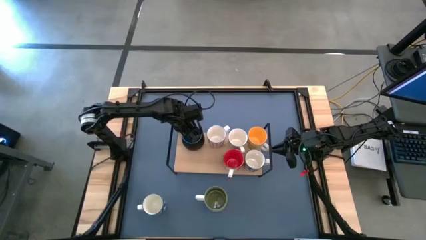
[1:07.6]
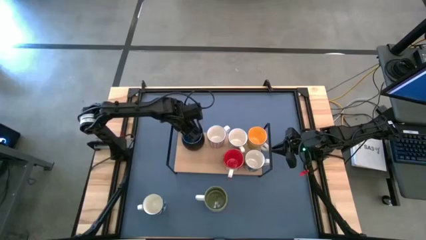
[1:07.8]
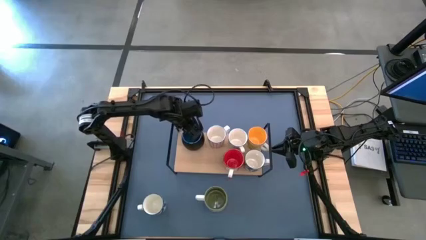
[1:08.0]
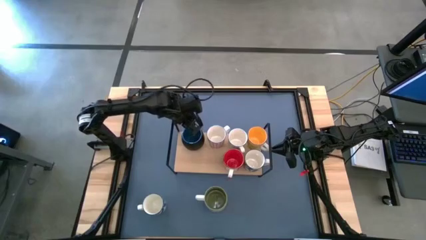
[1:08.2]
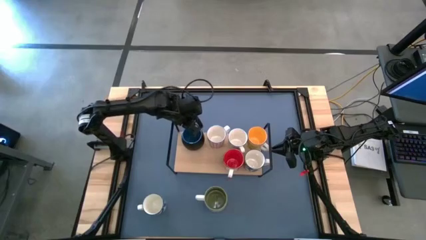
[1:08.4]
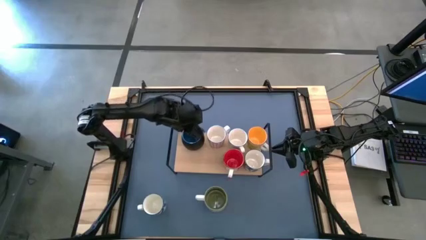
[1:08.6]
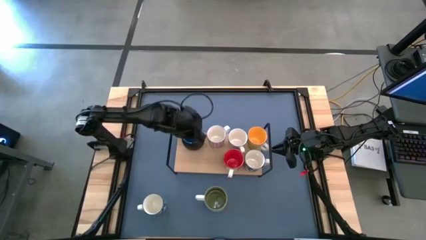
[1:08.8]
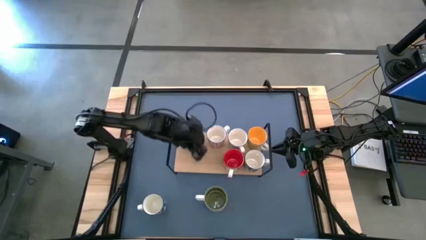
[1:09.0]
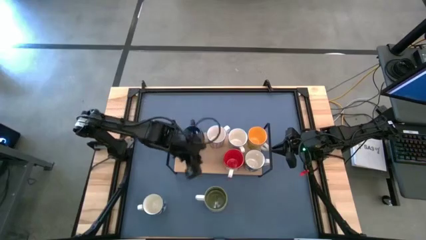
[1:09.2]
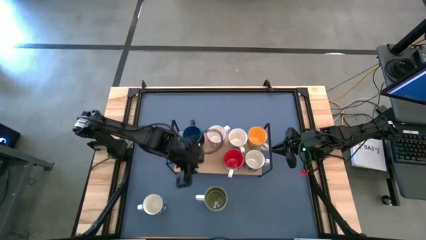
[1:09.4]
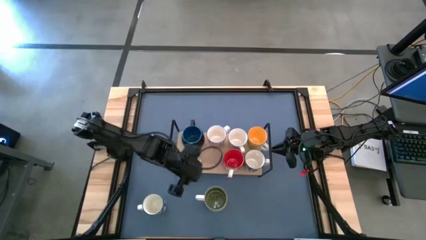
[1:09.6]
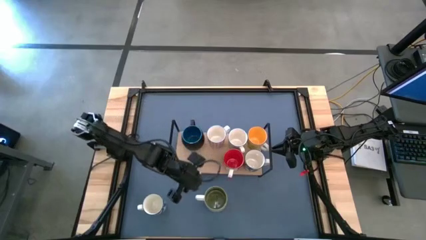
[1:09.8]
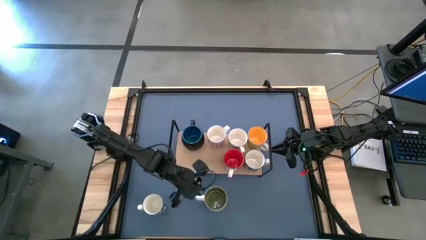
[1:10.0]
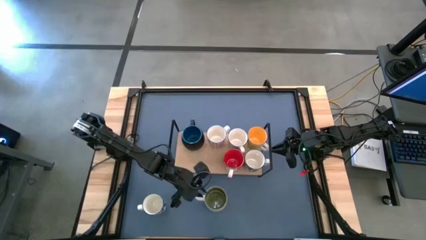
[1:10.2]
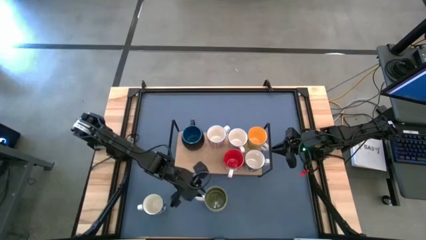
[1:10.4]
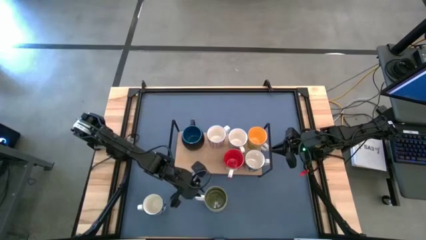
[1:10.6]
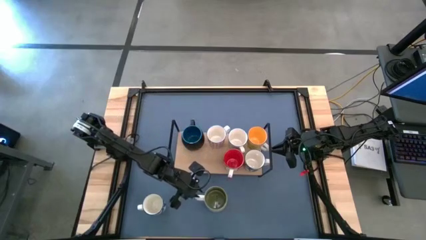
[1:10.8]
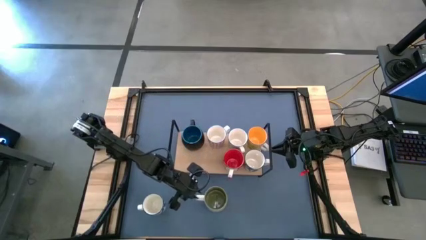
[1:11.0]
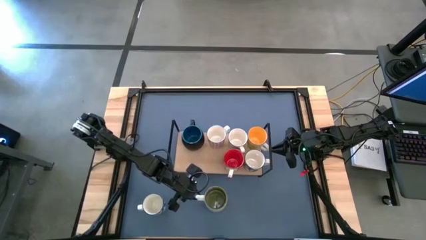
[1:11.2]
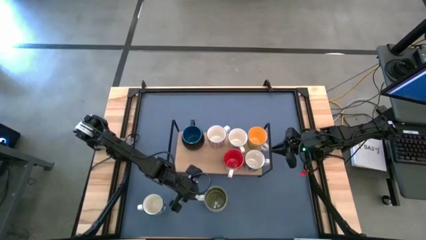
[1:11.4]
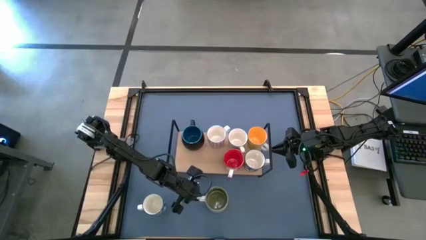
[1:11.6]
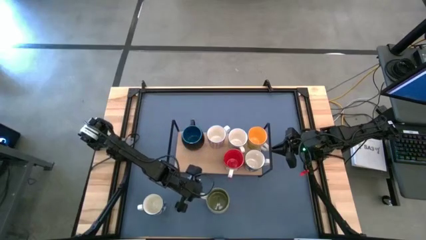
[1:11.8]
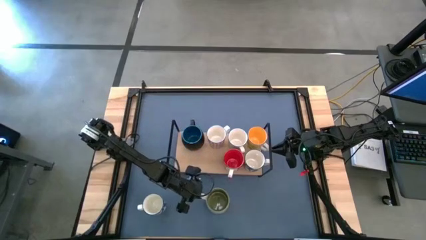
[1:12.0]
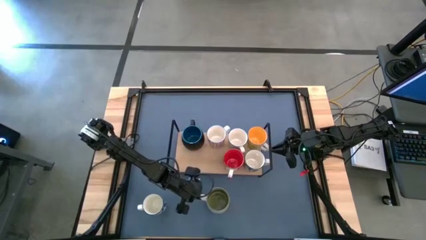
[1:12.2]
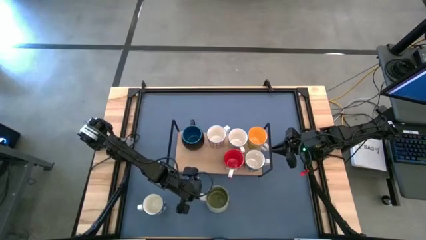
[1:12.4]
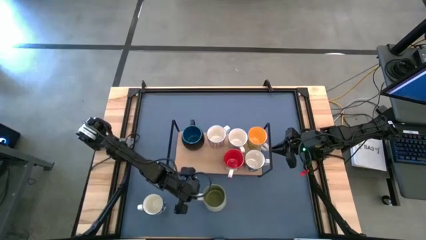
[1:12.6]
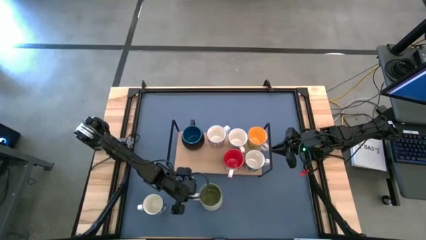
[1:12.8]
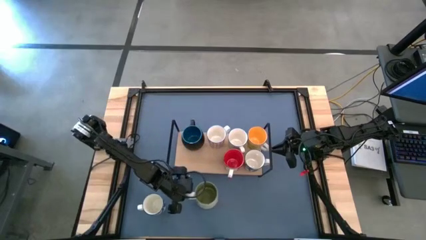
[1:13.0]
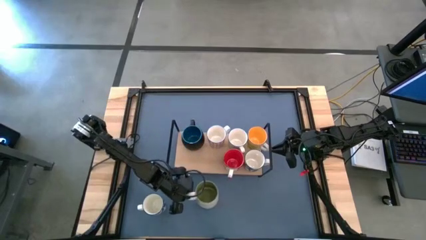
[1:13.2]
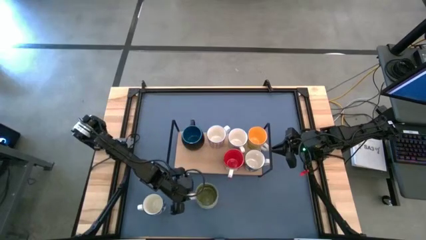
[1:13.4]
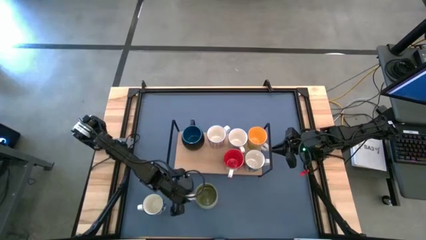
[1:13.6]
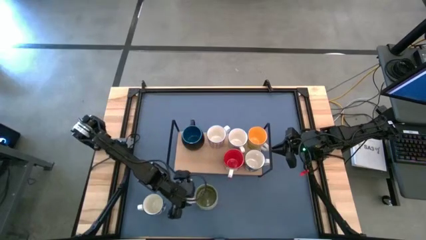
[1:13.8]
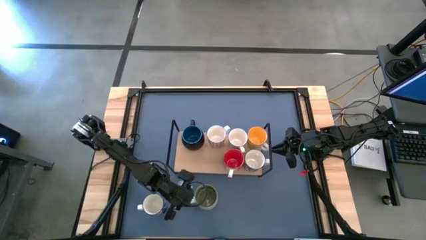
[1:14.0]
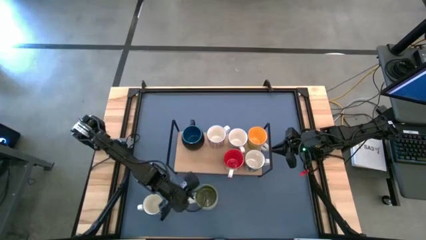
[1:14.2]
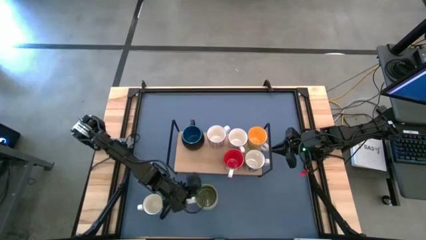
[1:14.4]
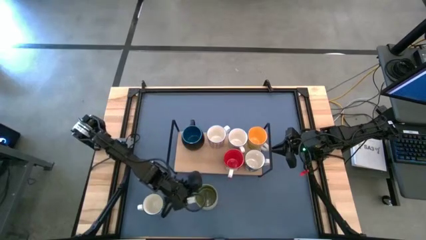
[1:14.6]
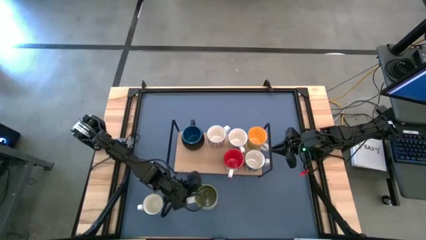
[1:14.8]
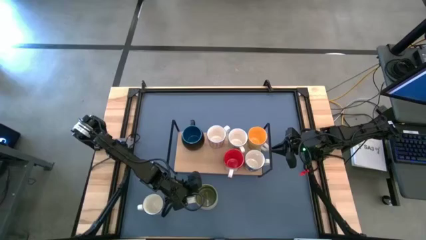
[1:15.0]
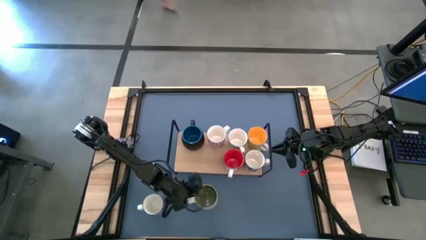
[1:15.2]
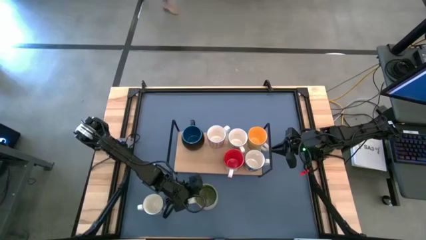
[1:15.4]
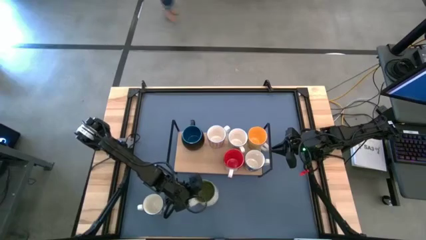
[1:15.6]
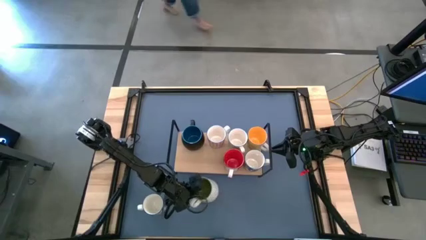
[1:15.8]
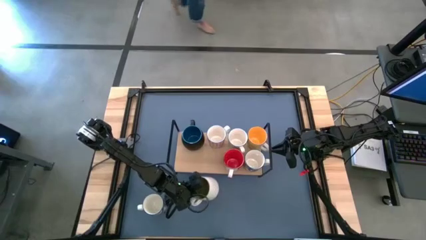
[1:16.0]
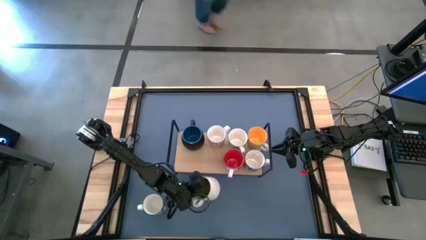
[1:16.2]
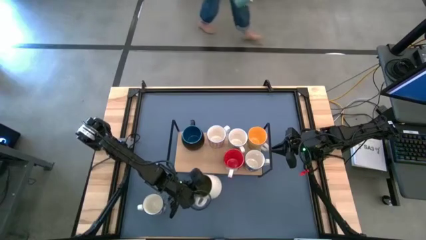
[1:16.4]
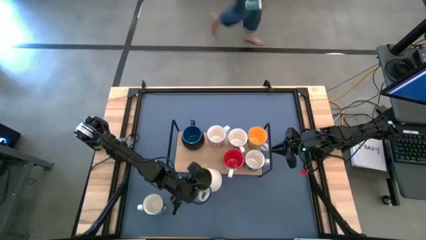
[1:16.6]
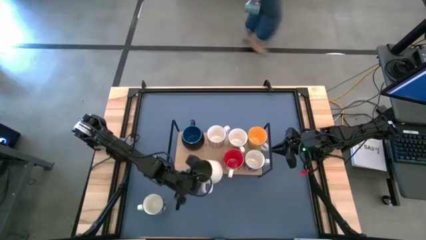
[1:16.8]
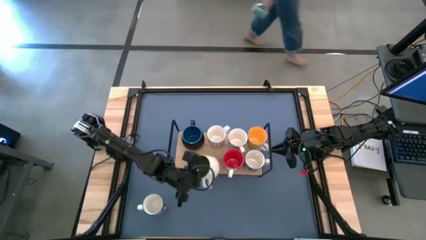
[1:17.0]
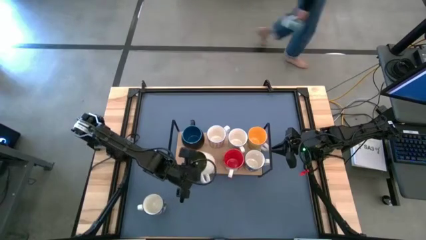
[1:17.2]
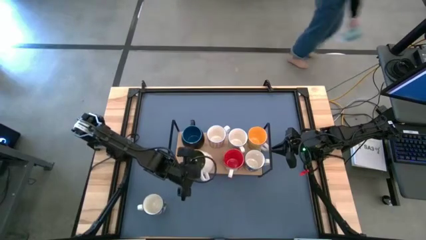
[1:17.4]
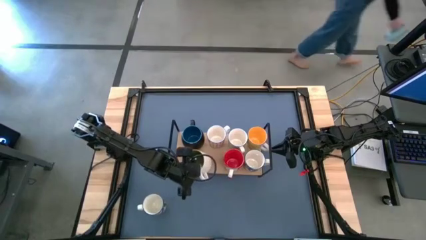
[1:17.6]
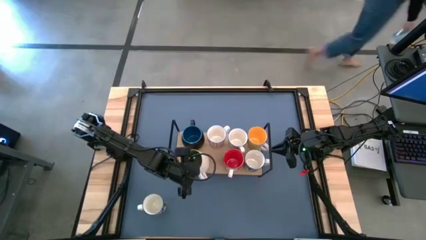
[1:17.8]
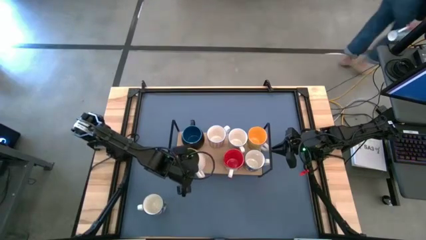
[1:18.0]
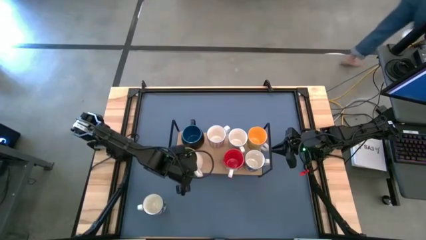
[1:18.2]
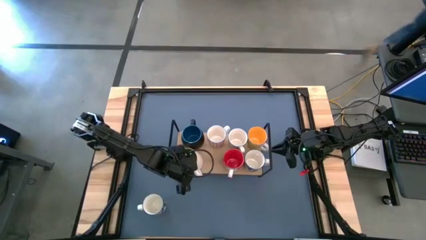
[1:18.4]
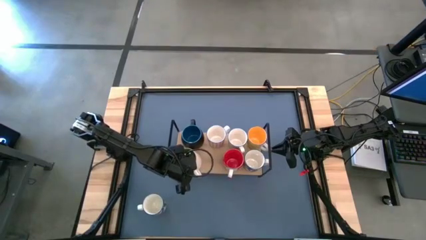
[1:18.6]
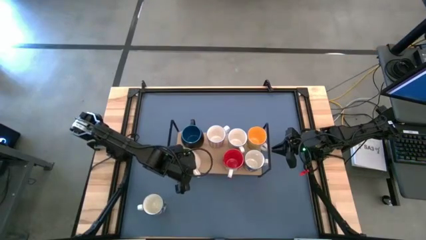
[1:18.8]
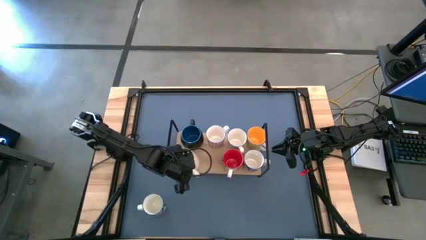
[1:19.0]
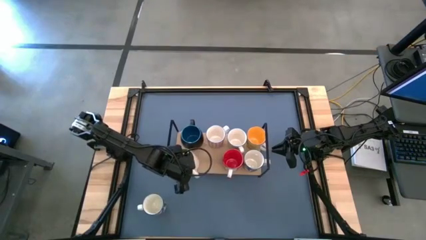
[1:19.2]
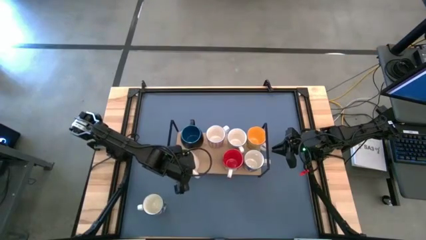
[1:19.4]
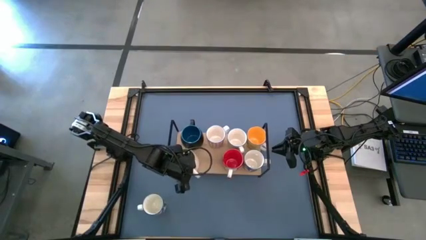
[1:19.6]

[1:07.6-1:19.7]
Task: Place coffee mugs
Put the white mug on the shelf

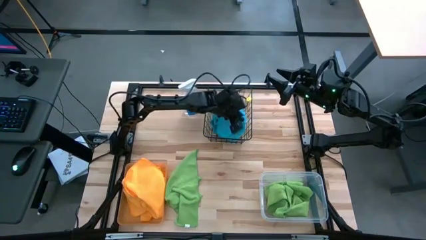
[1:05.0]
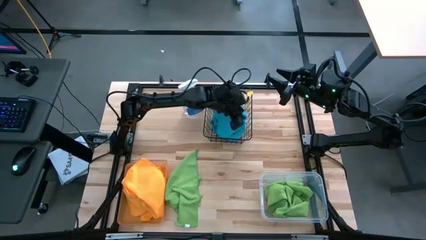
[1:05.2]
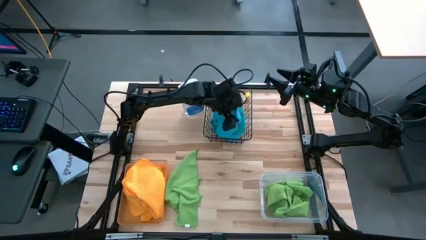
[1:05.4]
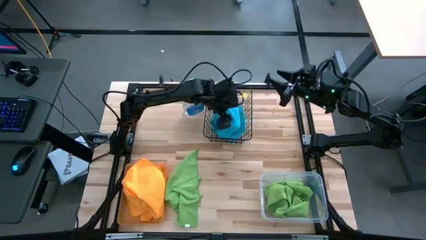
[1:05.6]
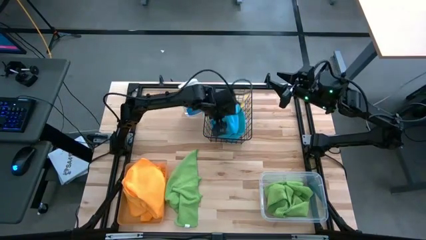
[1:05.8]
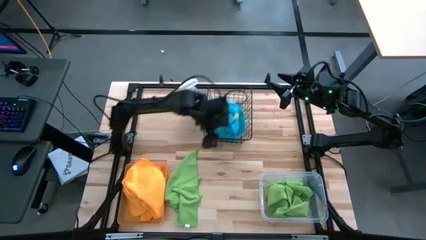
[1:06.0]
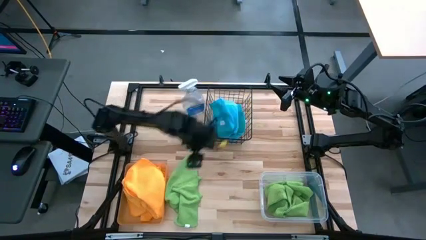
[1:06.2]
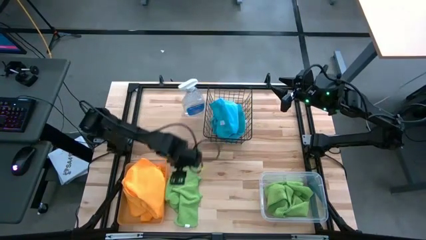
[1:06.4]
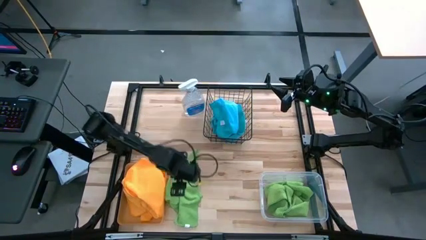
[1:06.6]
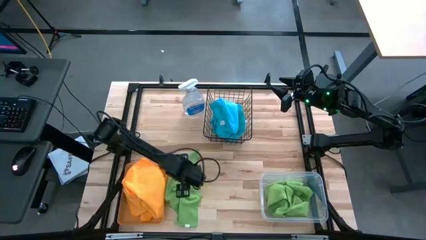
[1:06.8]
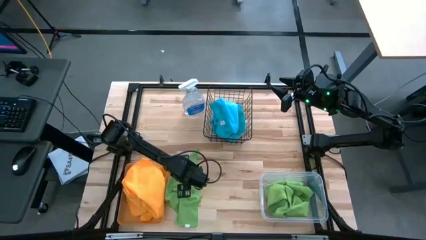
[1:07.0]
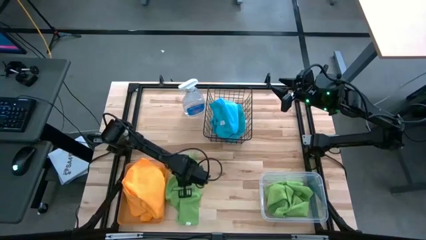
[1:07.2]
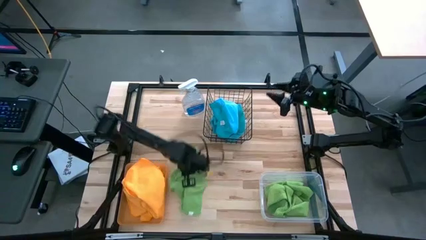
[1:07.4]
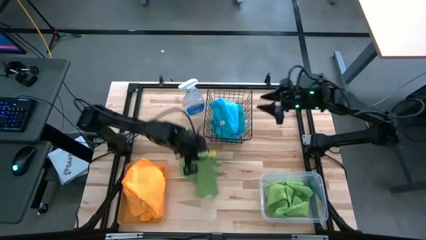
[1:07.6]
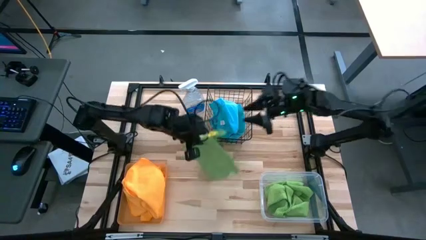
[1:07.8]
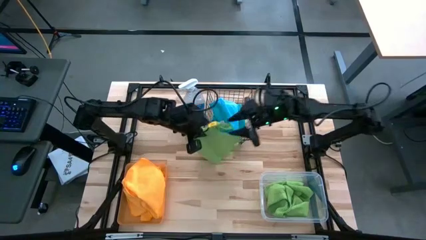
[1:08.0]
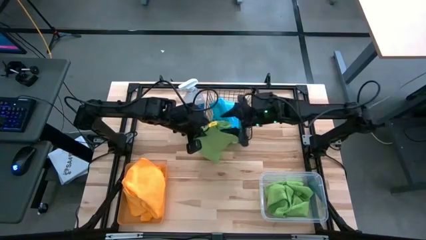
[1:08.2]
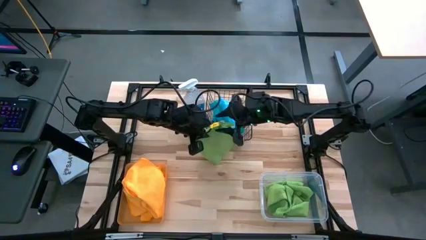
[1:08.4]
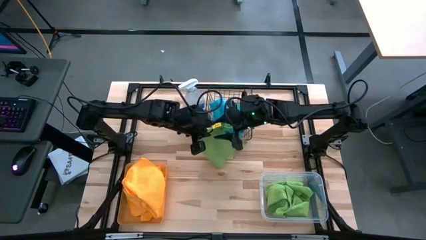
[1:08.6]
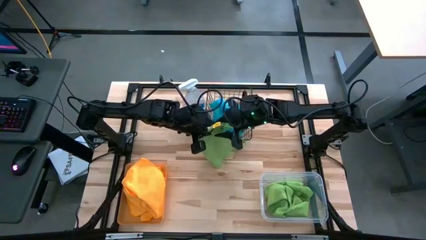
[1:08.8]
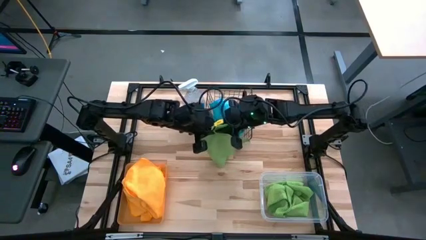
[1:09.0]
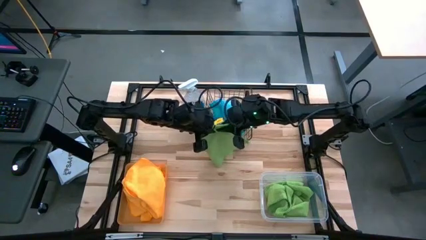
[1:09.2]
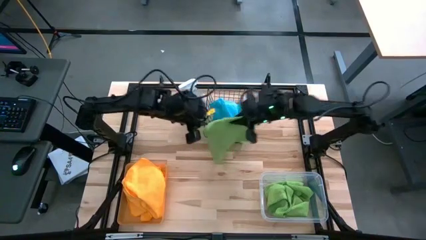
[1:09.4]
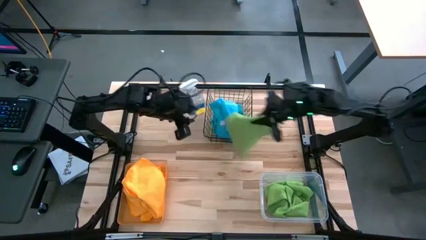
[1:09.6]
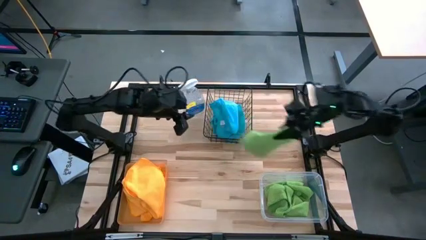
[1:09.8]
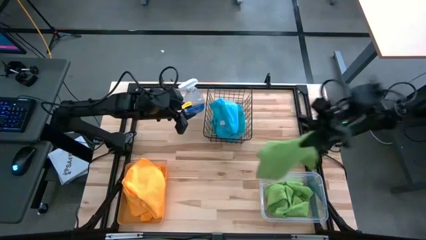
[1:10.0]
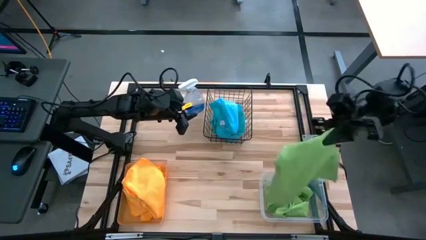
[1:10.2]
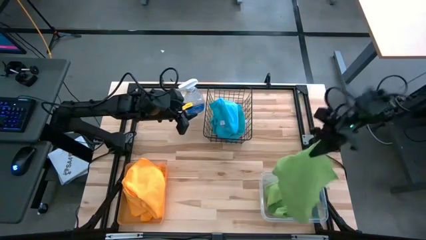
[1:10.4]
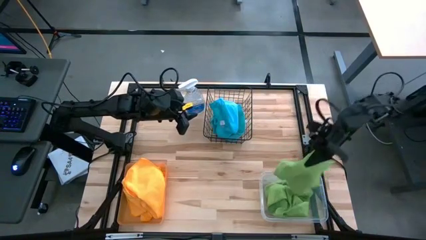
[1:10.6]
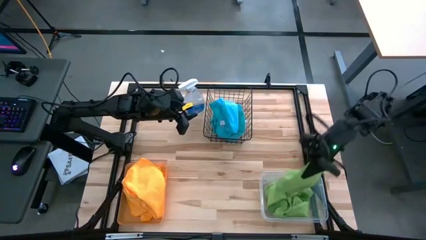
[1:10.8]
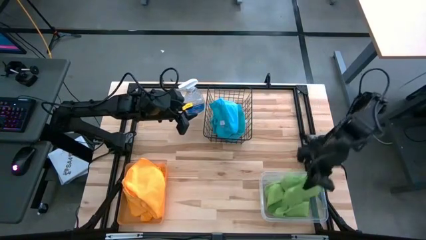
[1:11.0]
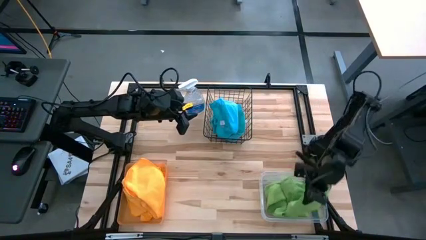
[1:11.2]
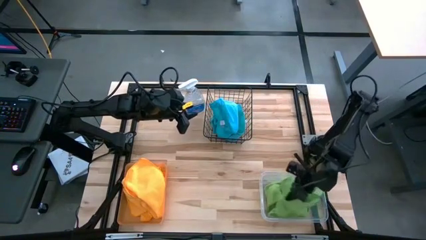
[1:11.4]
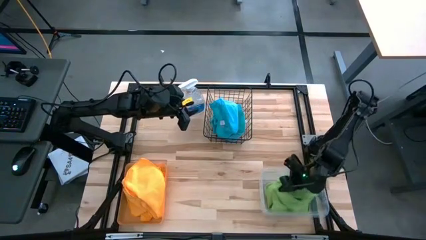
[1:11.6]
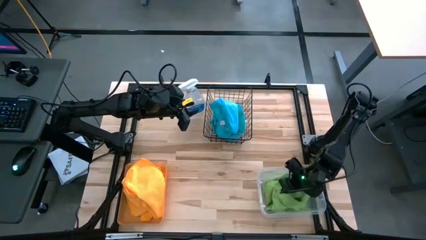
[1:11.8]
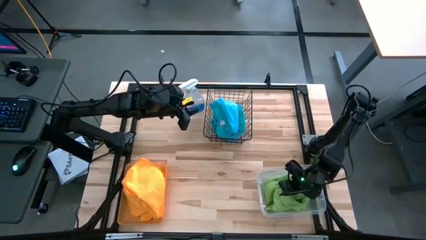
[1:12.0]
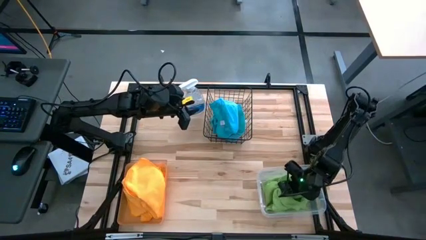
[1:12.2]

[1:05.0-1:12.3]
Task: Sort microfiber towel by color & place in baskets
Put the green towel into the transparent bin
